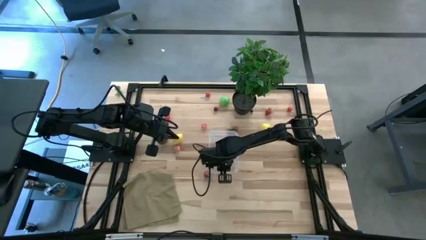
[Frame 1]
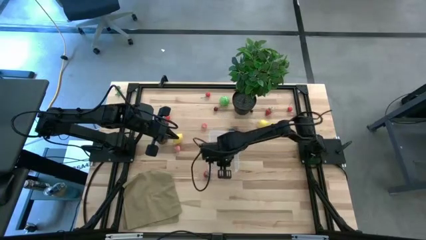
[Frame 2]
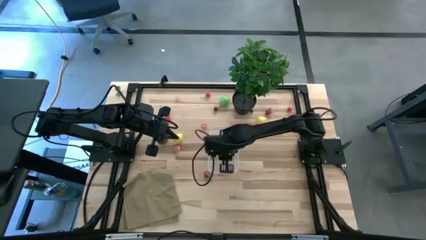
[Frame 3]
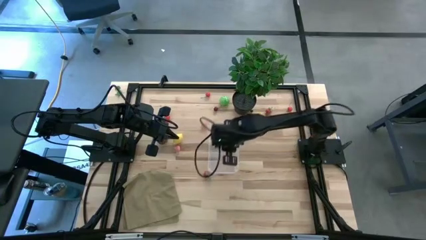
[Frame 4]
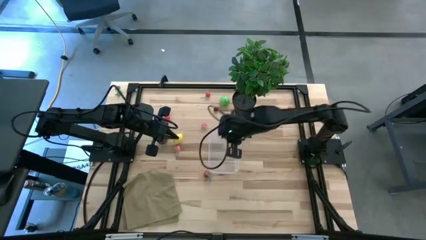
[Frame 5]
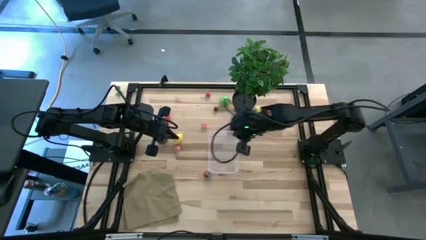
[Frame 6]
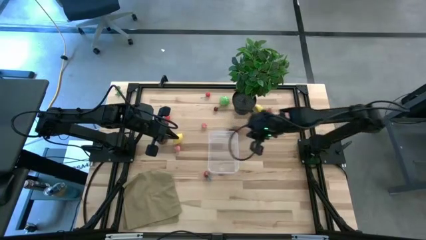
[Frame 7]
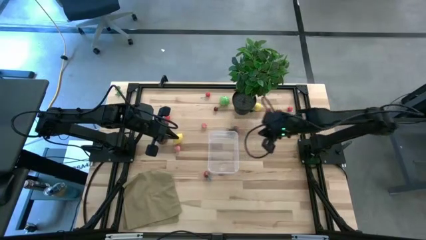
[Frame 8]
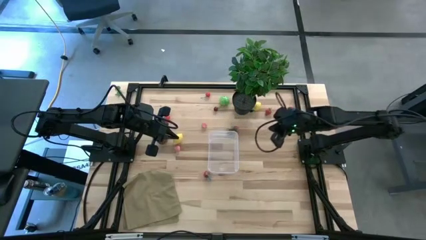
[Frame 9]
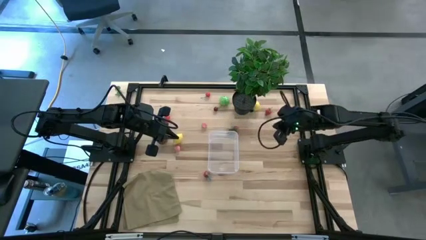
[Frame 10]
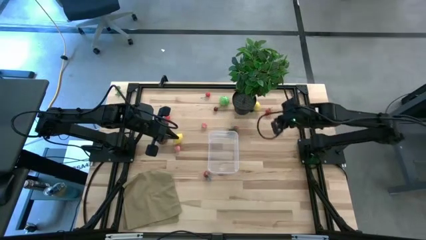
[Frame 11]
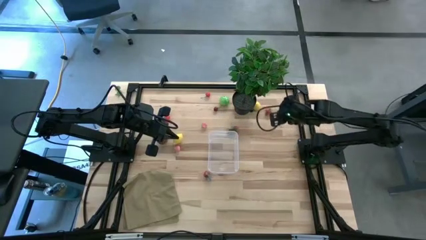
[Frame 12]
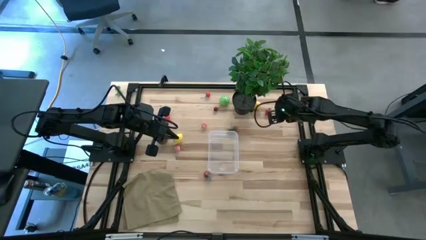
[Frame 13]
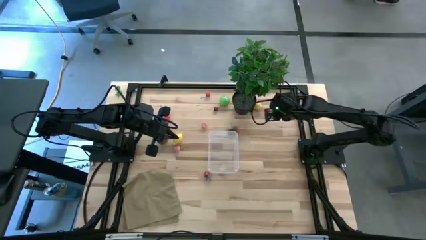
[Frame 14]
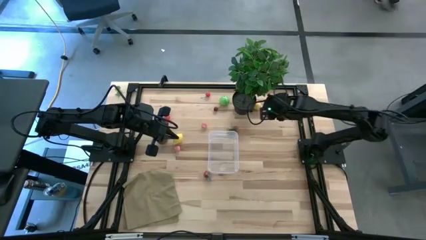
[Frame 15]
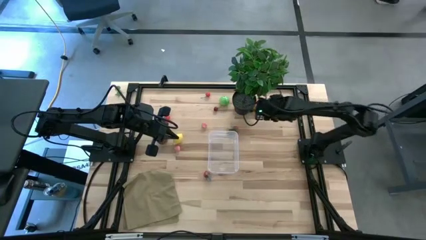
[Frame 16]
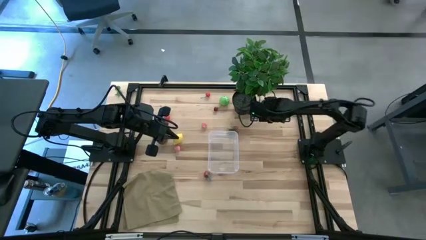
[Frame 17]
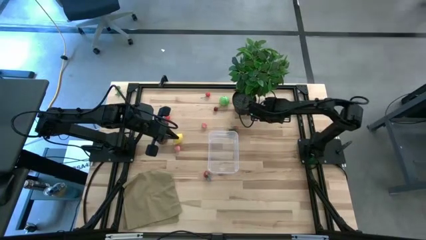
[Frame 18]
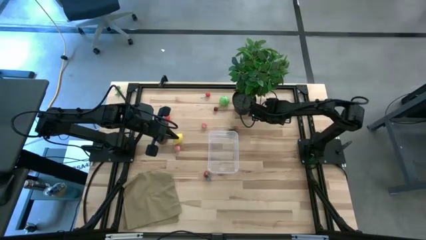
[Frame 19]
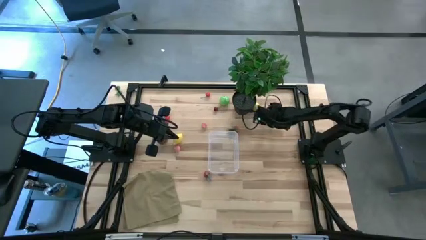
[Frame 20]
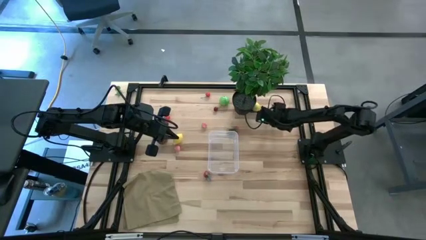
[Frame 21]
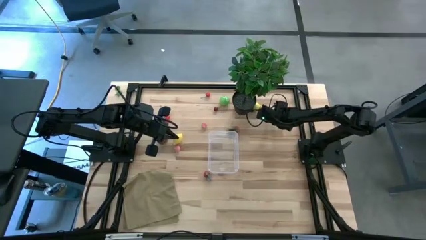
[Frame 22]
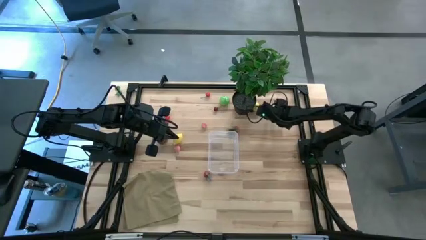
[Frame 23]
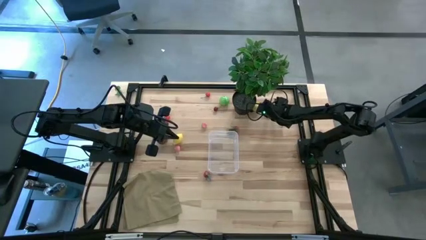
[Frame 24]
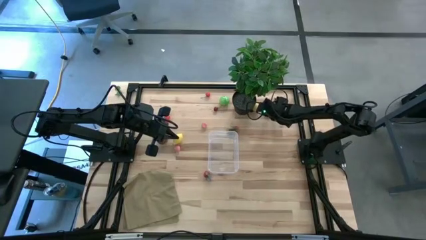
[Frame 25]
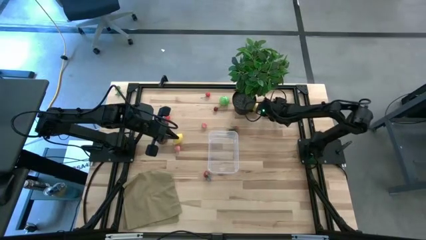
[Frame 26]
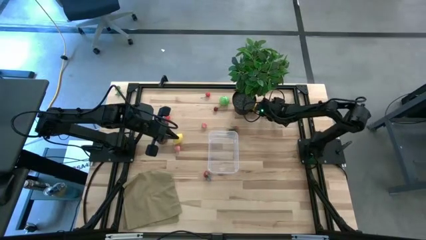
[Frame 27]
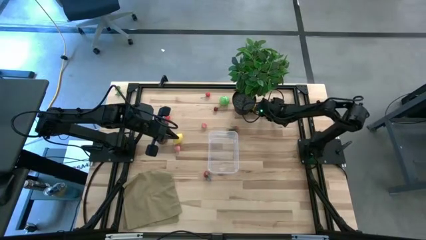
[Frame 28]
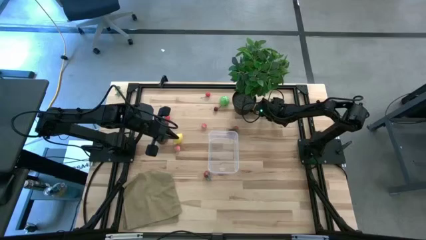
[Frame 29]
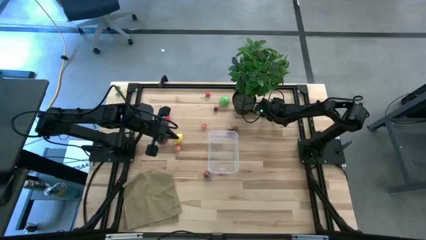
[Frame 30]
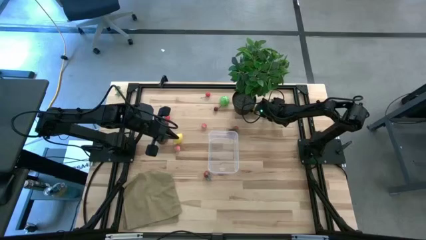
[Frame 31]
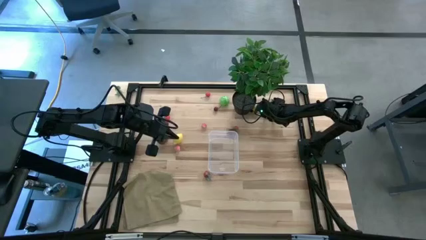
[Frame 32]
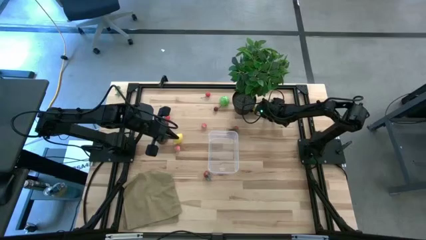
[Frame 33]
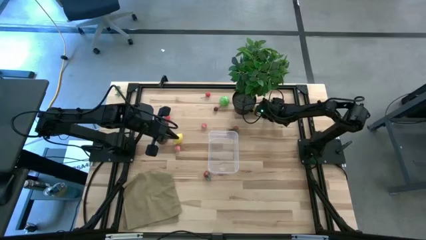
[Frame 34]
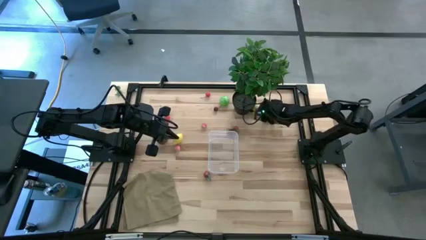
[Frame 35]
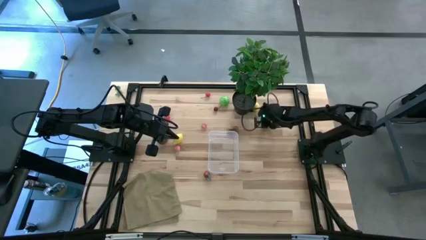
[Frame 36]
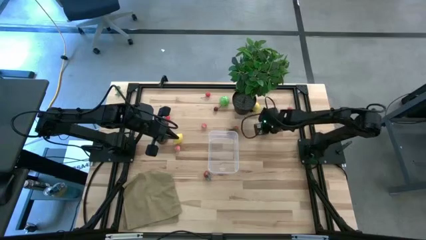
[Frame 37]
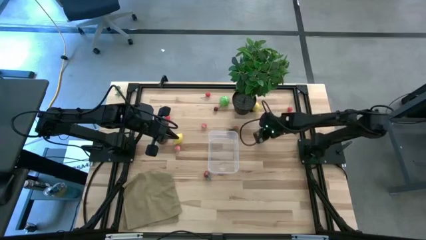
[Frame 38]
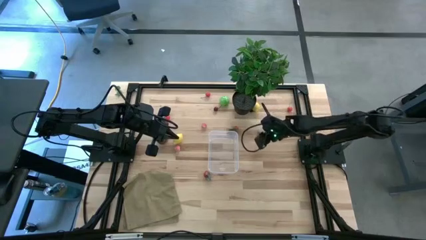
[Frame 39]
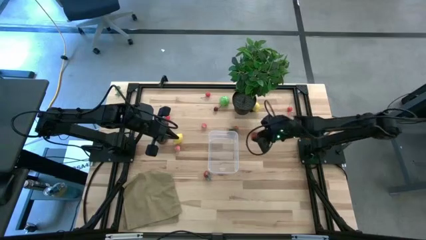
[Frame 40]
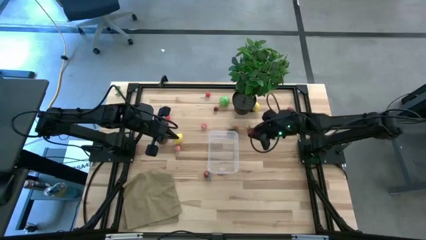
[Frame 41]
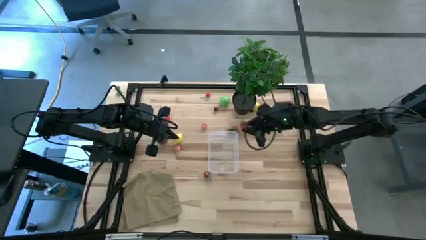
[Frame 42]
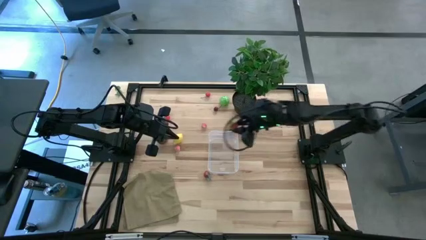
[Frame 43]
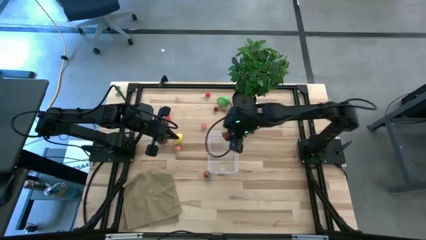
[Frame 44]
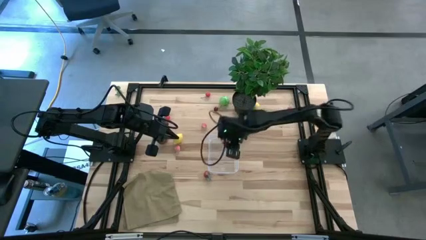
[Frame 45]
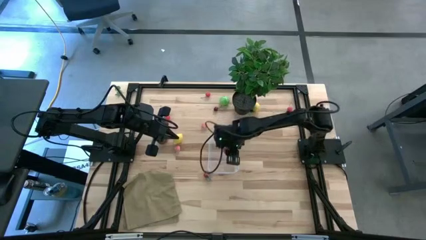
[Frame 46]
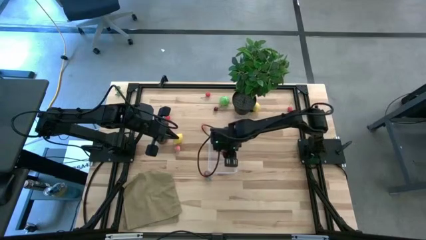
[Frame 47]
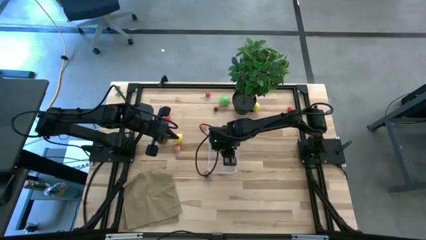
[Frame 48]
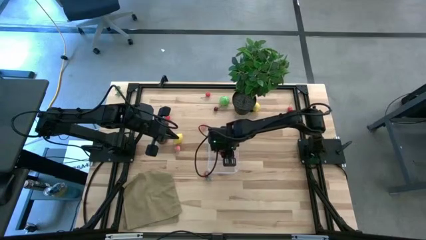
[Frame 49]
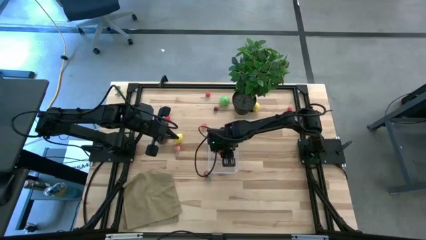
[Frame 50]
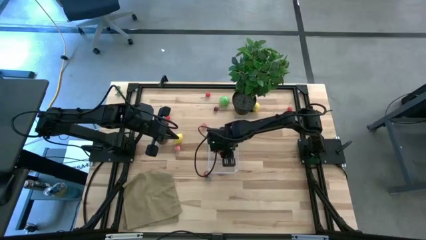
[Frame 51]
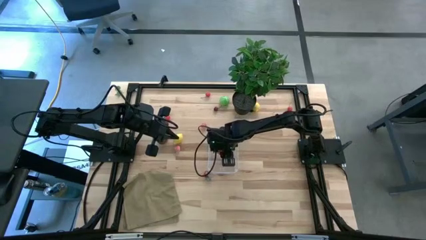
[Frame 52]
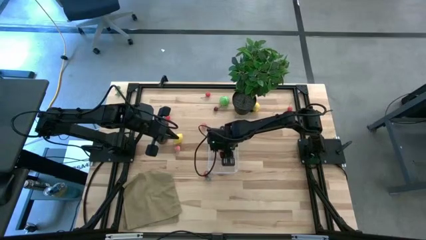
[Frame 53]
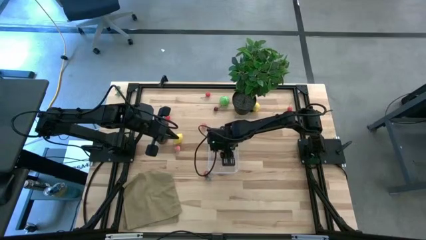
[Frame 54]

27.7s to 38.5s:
Task: Pick and placing Produce into tupperware
Put the red strawberry into the transparent container
